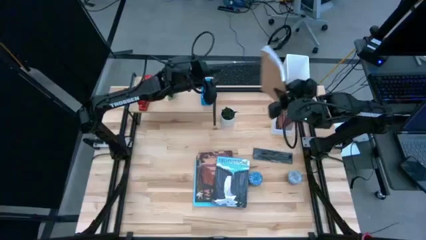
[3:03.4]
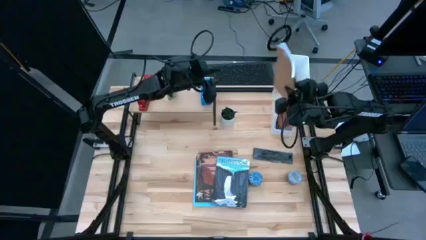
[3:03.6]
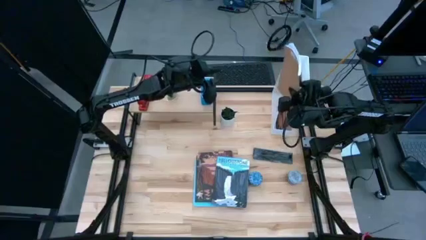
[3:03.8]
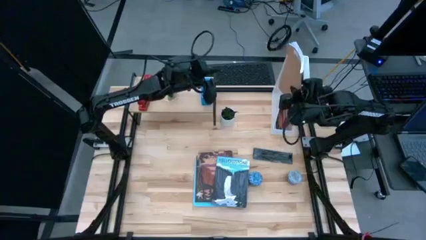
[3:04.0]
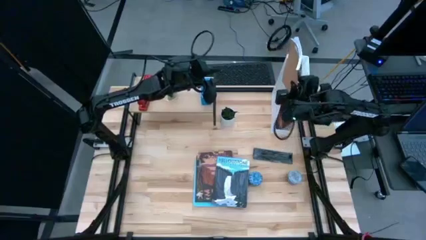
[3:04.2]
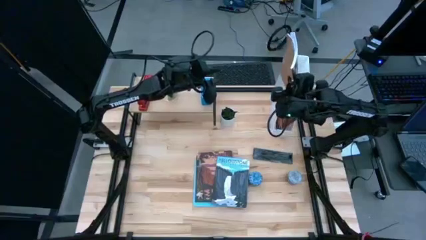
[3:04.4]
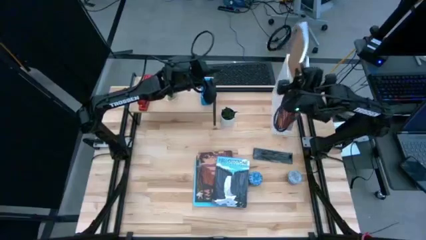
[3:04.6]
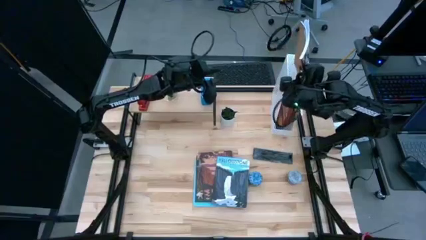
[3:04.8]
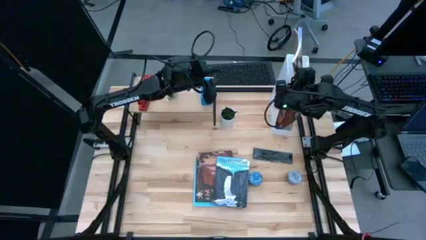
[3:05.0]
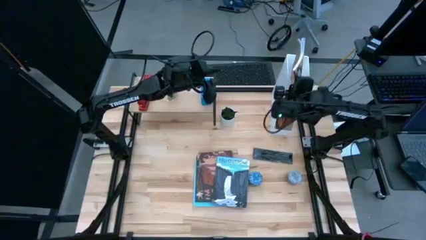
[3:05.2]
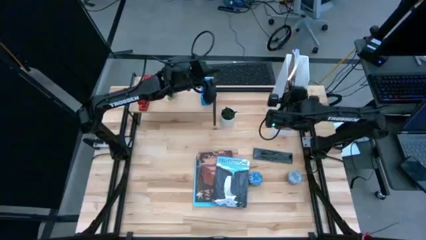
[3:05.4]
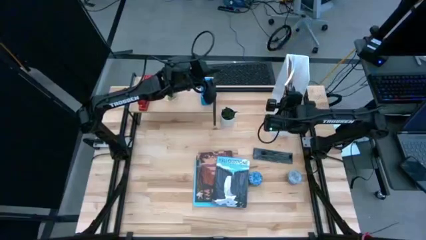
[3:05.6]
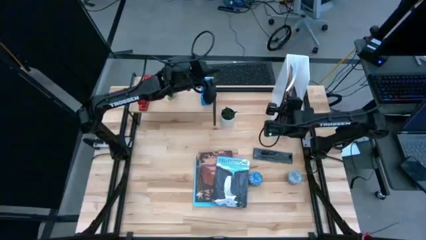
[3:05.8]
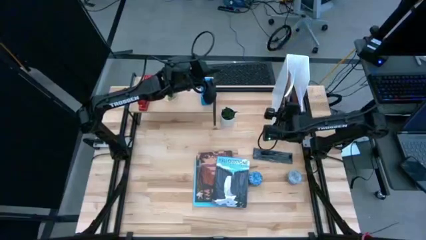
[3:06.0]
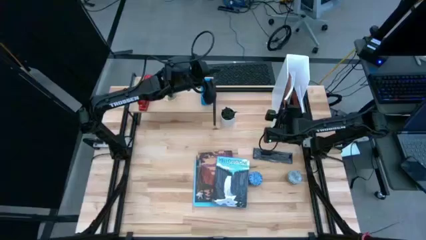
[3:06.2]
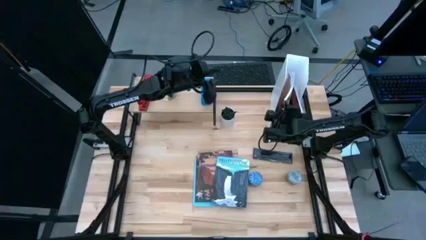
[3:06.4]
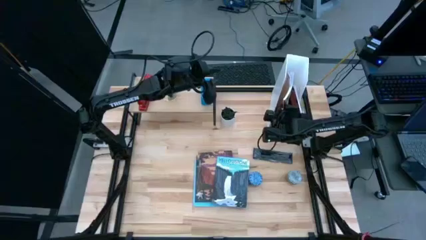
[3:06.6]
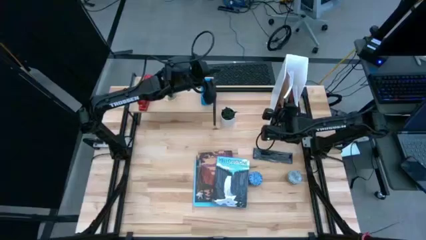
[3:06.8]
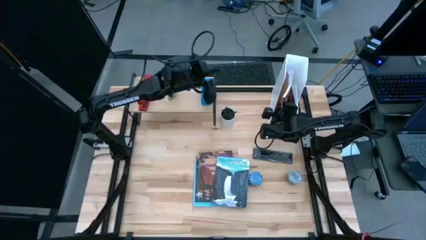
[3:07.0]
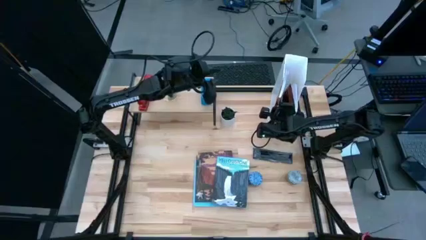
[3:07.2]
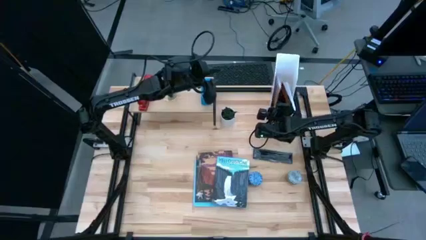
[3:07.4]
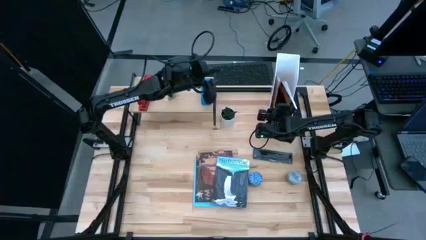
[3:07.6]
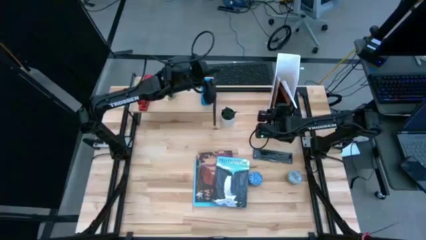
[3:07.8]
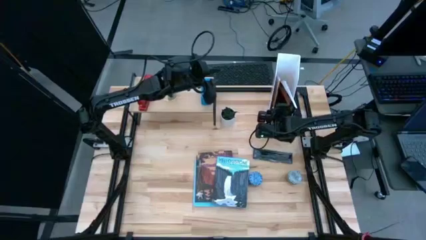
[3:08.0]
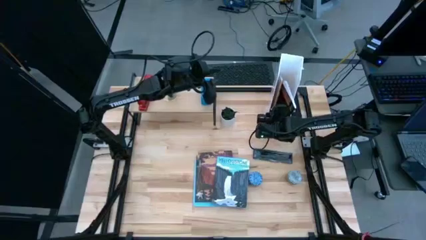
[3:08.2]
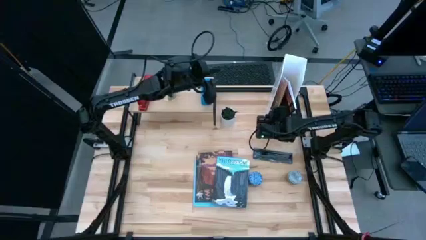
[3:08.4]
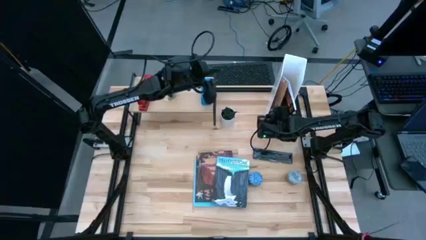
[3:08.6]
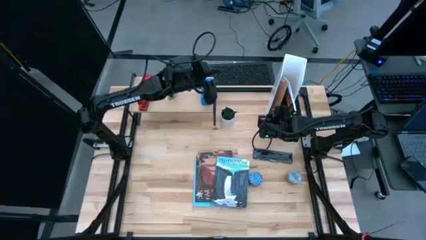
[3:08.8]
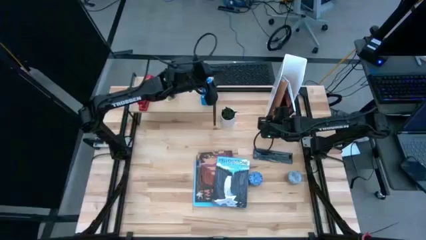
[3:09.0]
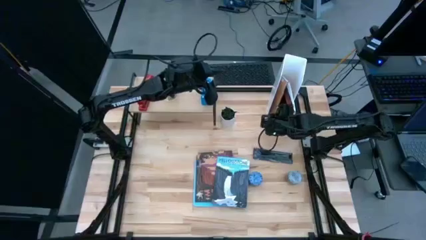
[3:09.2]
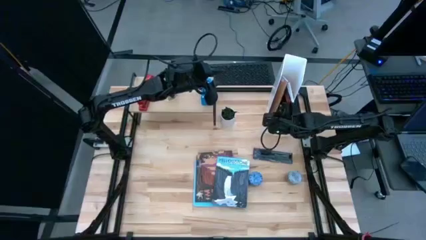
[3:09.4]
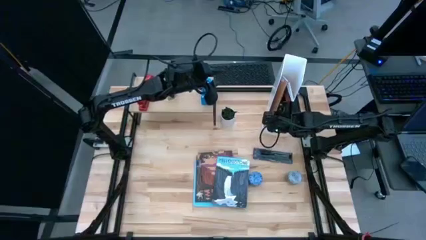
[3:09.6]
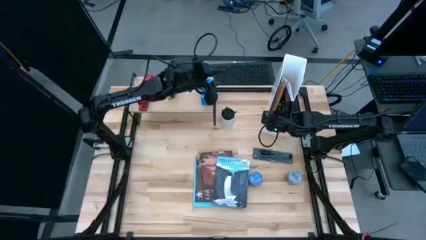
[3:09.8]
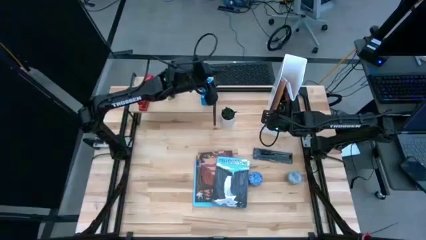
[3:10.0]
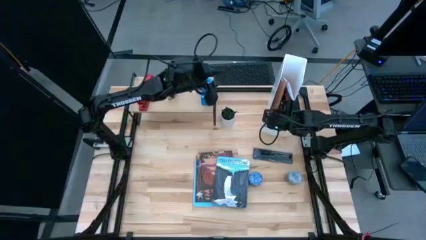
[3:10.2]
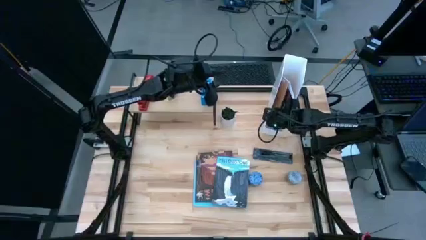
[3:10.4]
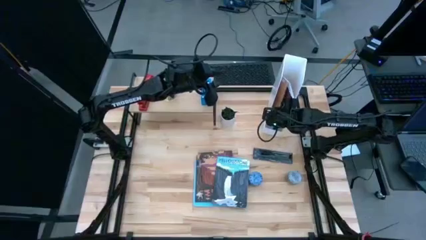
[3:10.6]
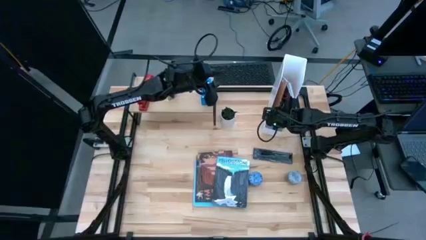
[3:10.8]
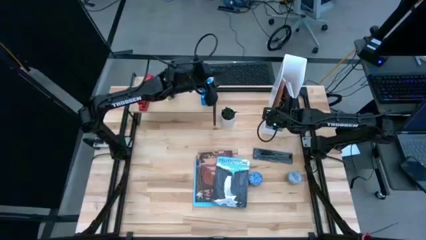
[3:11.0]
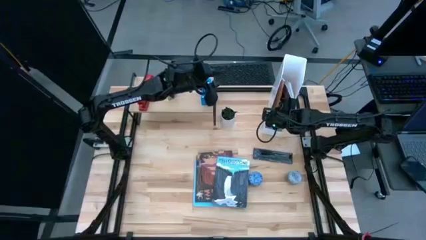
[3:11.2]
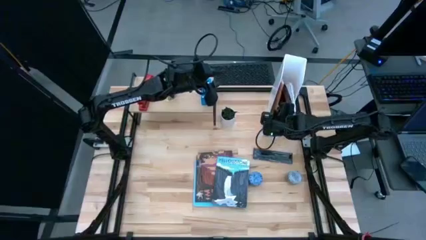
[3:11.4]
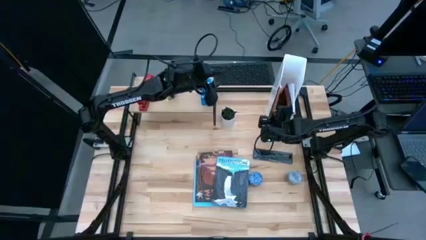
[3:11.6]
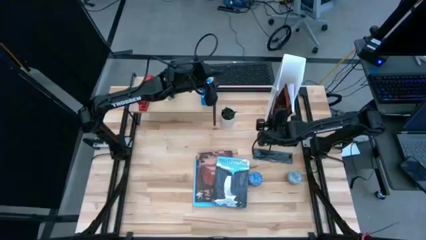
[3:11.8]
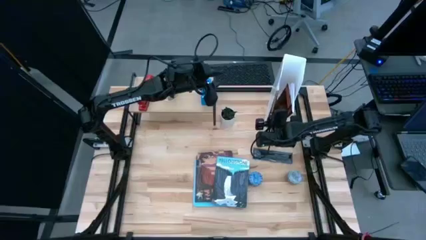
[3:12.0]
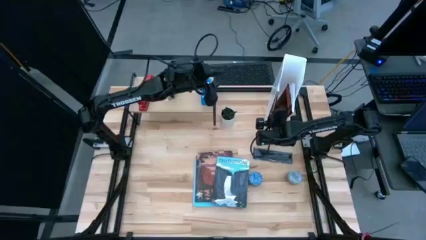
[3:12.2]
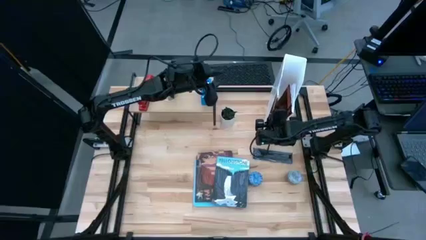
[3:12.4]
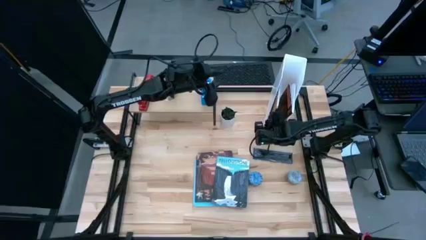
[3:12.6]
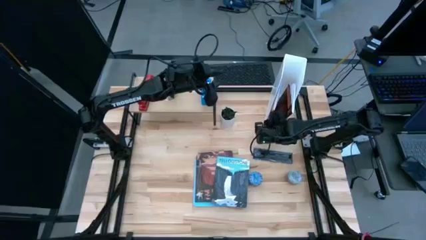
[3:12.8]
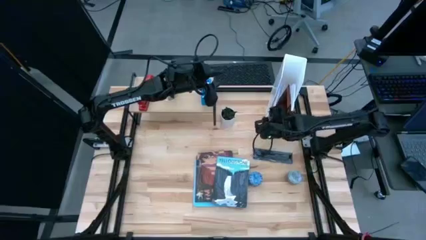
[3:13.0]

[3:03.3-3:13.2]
Task: Stock shelves
Put the blue/brown book into the white book shelf

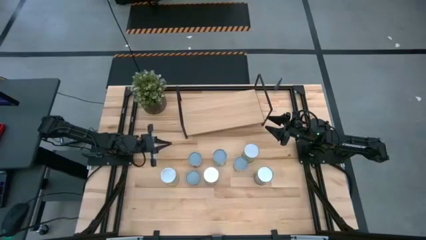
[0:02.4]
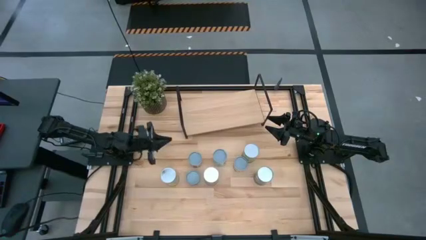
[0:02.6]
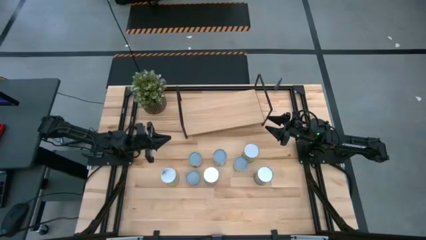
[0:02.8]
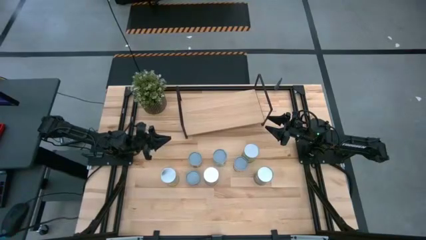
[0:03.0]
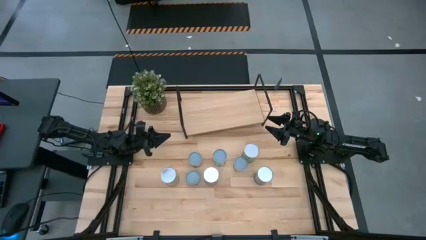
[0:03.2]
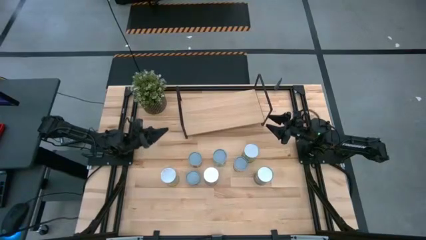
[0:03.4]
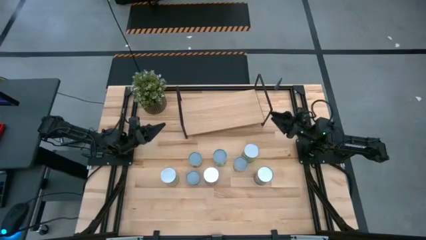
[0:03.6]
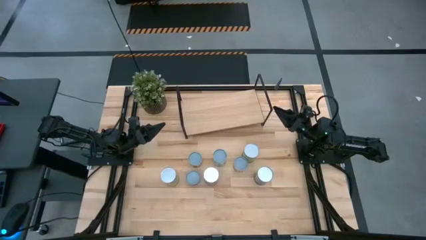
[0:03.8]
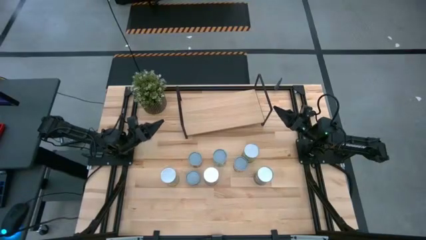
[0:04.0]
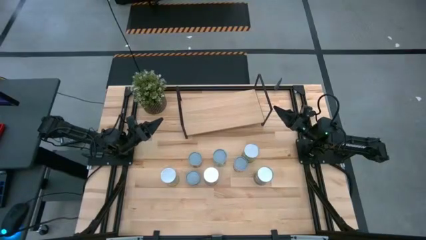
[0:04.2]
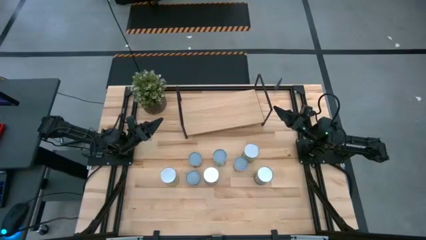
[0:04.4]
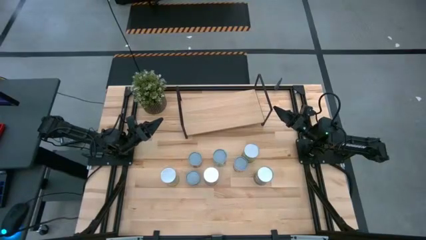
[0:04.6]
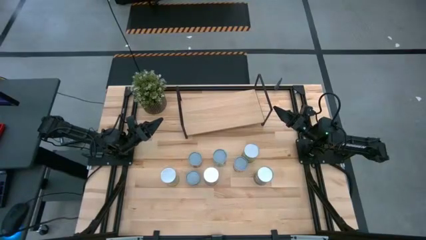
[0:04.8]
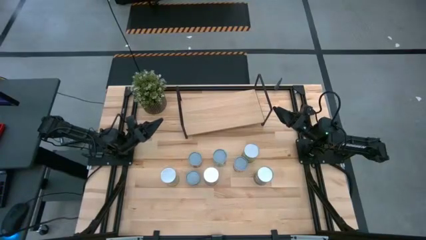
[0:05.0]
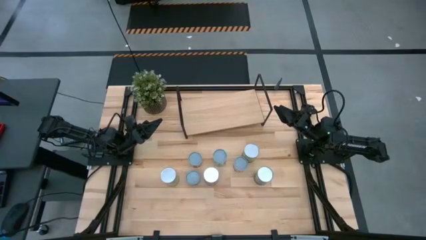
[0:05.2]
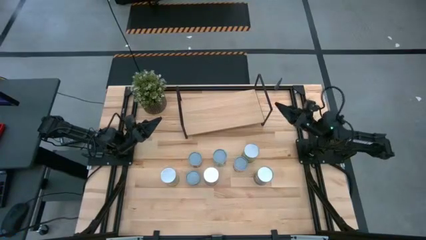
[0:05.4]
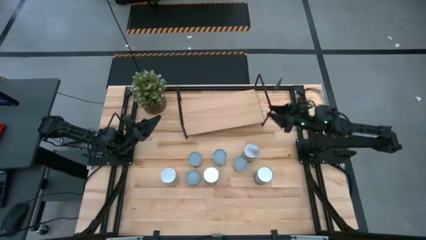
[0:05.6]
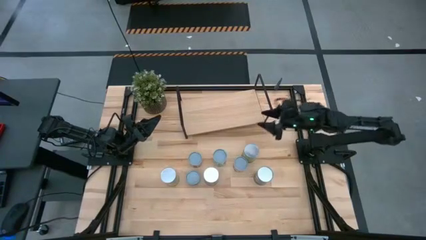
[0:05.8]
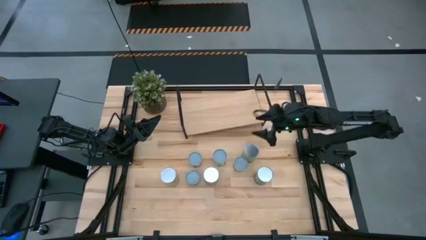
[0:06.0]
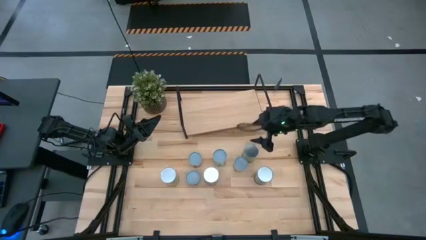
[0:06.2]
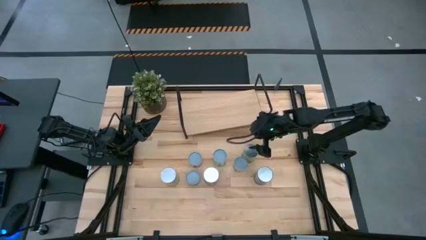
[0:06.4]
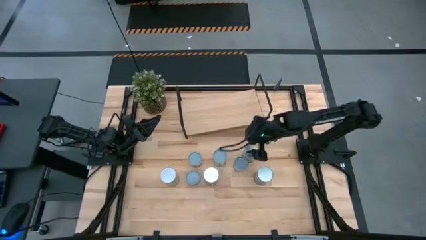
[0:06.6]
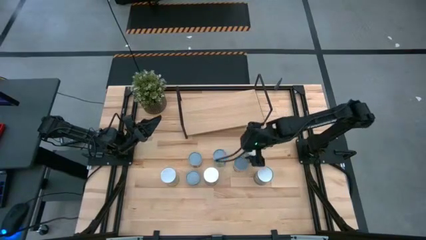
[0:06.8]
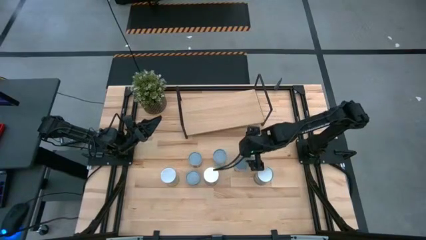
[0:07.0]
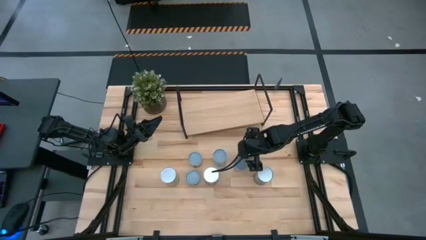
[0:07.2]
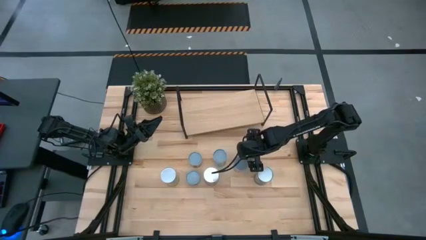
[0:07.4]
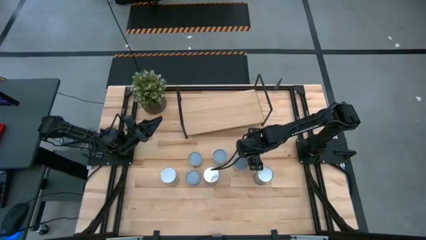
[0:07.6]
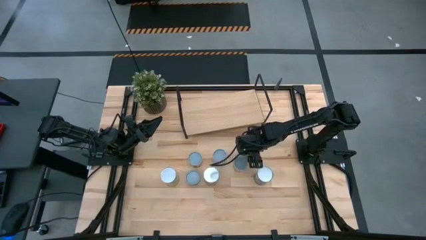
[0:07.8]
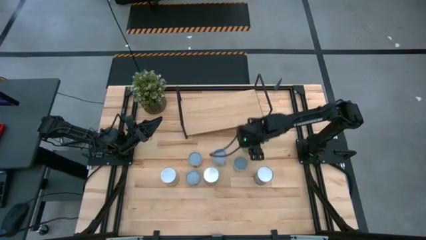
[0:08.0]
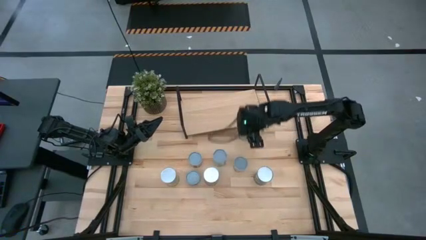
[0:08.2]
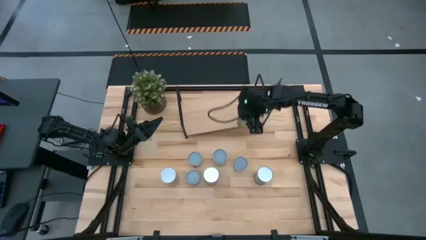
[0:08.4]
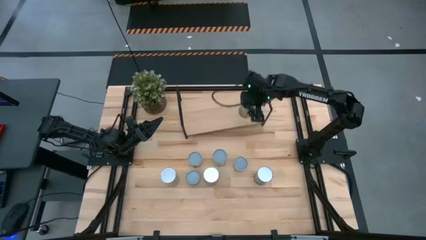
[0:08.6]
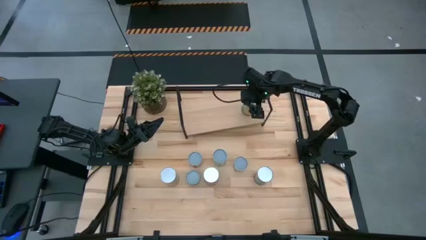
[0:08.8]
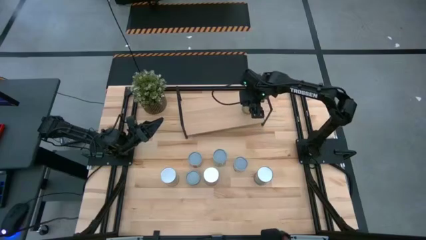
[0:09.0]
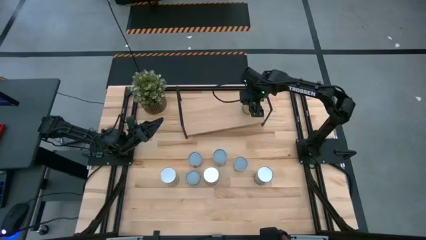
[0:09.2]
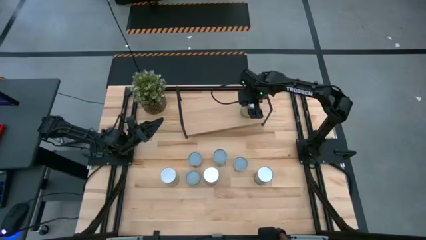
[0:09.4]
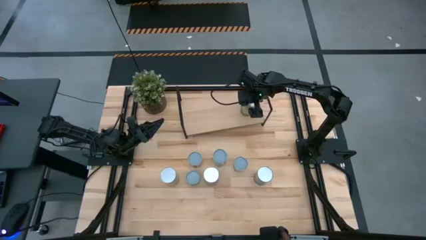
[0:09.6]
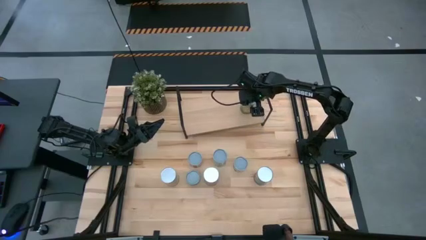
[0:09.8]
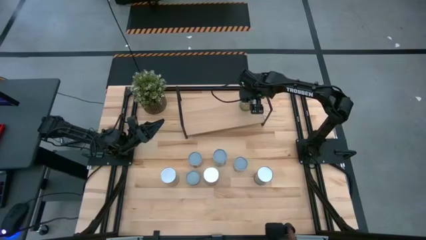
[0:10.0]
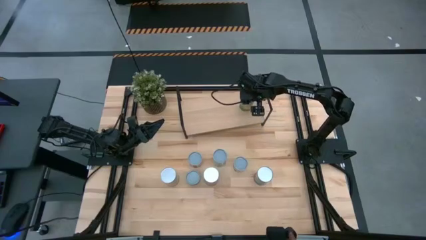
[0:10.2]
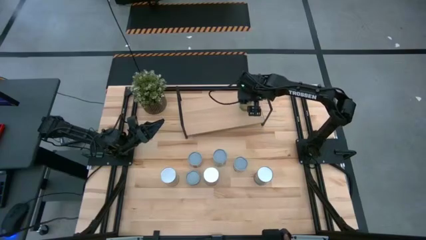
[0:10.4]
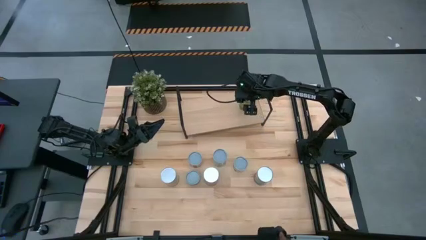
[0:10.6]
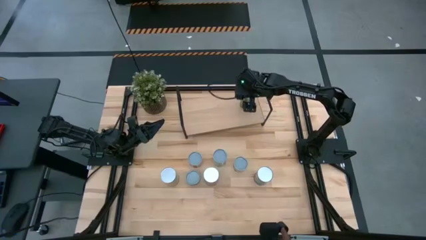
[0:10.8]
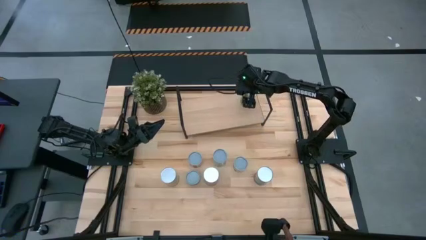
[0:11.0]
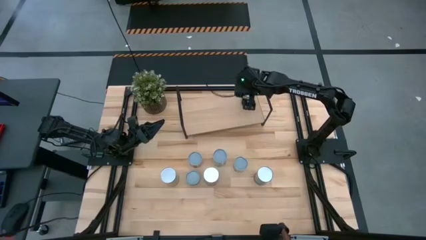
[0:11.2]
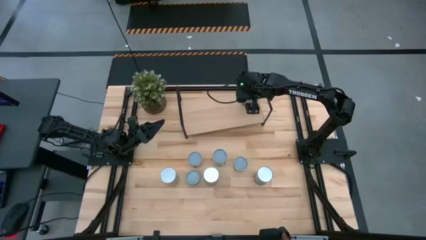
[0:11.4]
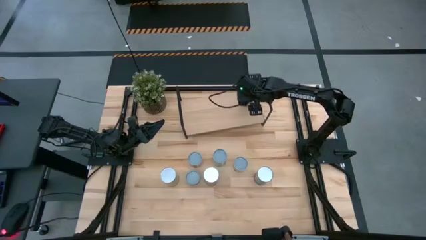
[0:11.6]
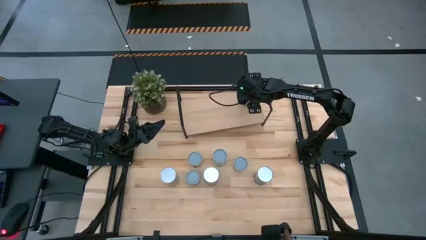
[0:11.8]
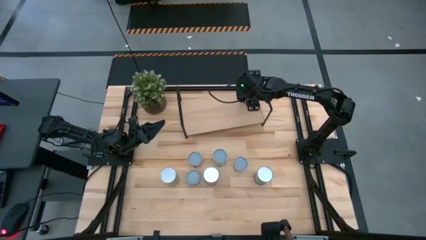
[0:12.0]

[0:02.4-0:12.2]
Task: Pick and place cans onto a shelf
Put the canned oranges can on the shelf
